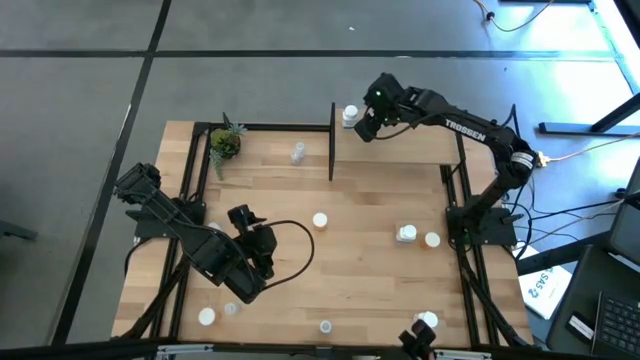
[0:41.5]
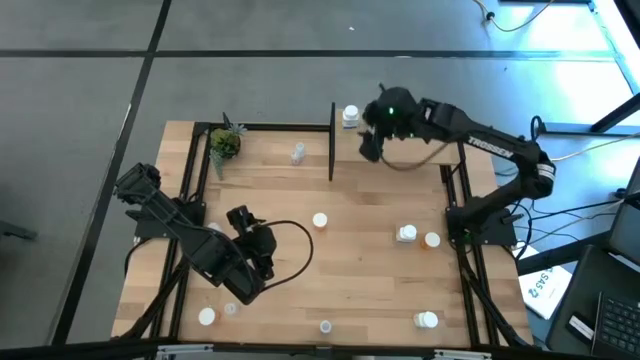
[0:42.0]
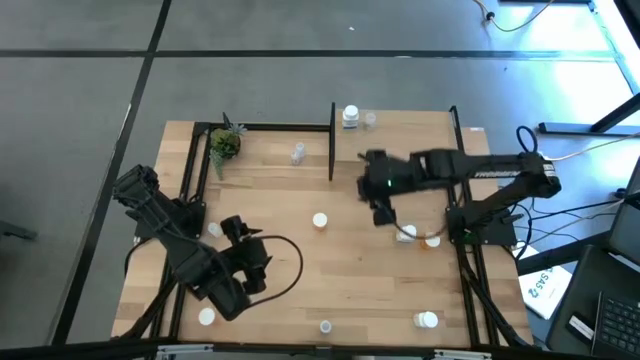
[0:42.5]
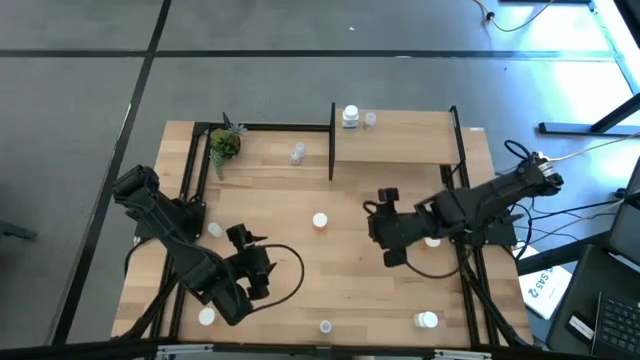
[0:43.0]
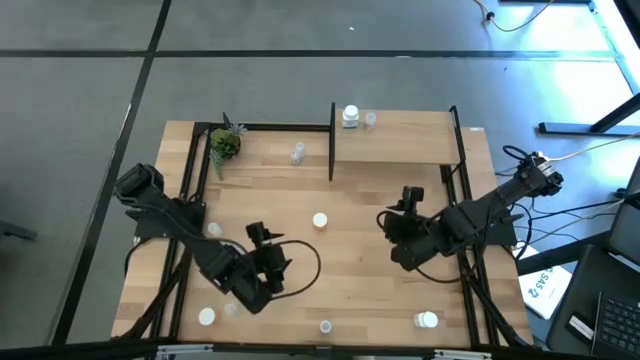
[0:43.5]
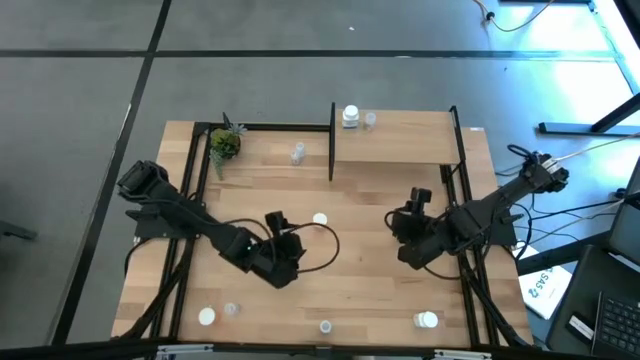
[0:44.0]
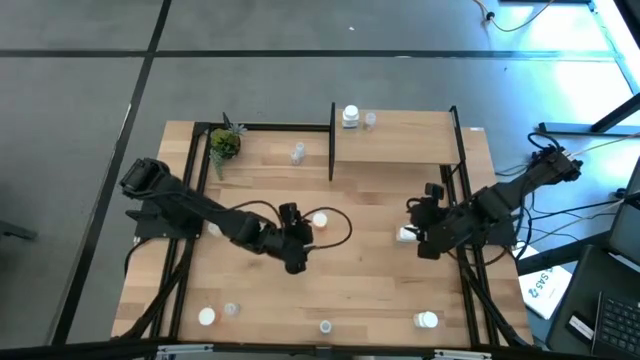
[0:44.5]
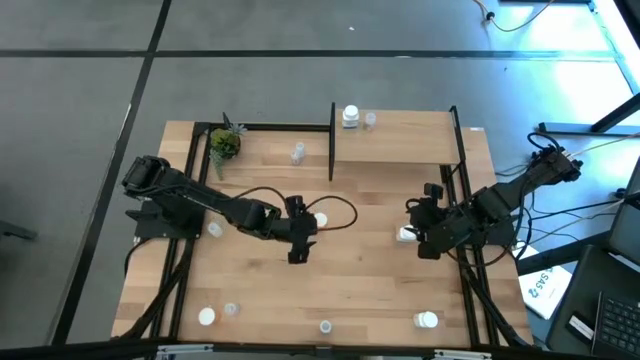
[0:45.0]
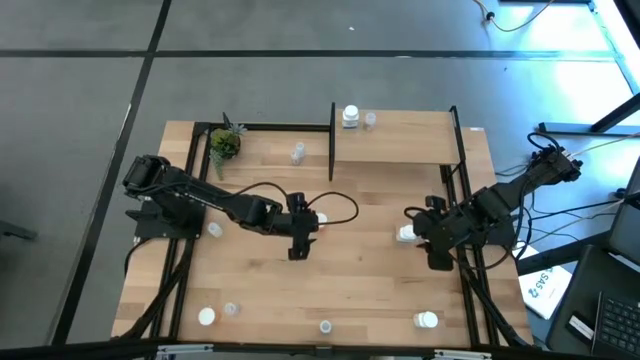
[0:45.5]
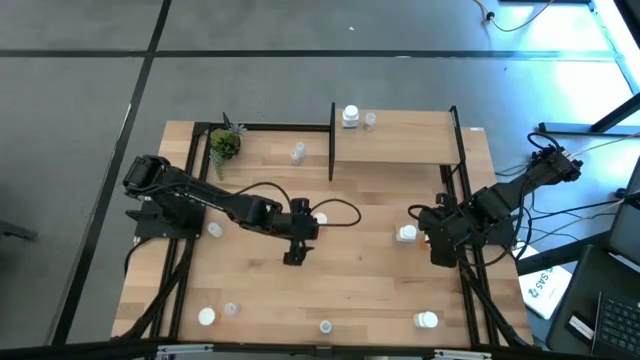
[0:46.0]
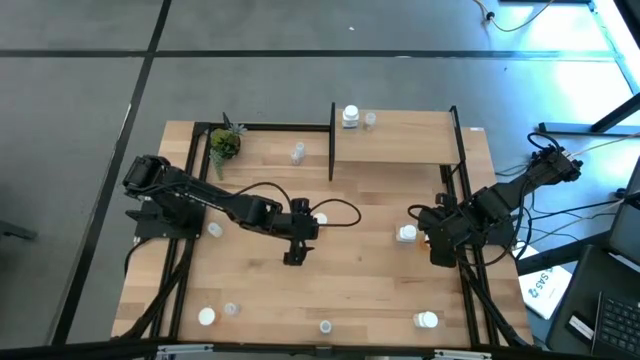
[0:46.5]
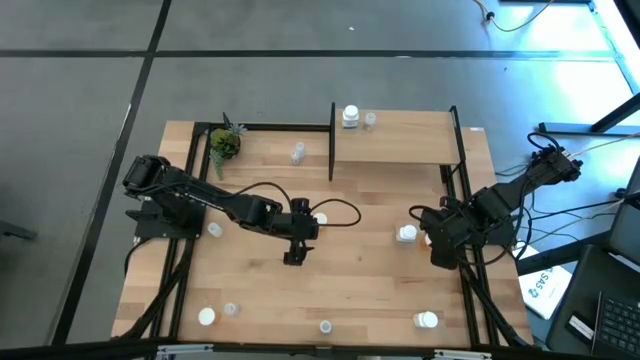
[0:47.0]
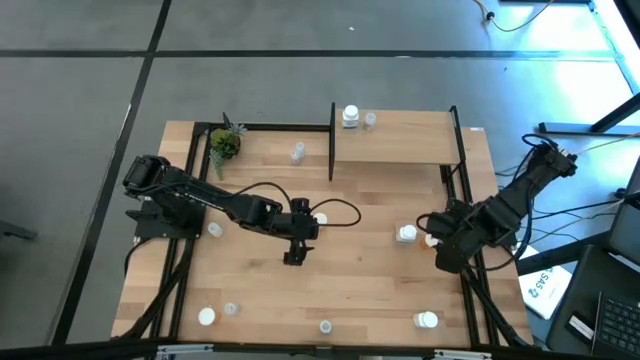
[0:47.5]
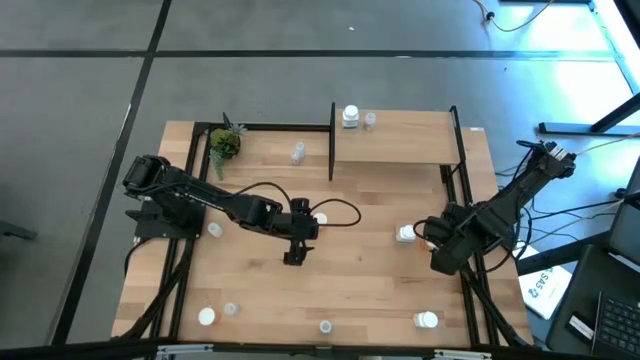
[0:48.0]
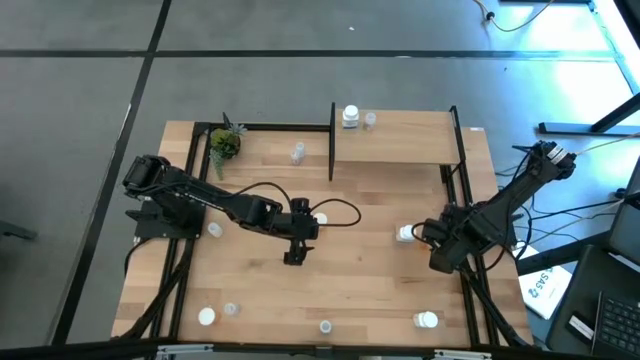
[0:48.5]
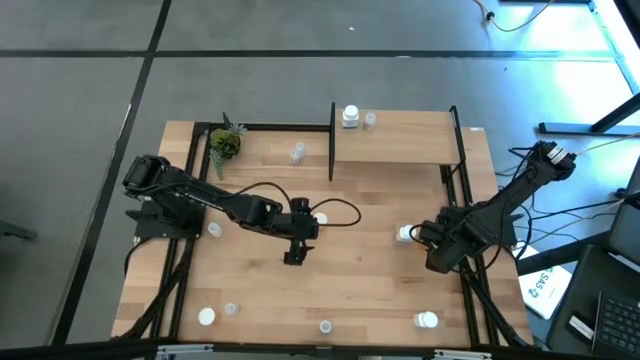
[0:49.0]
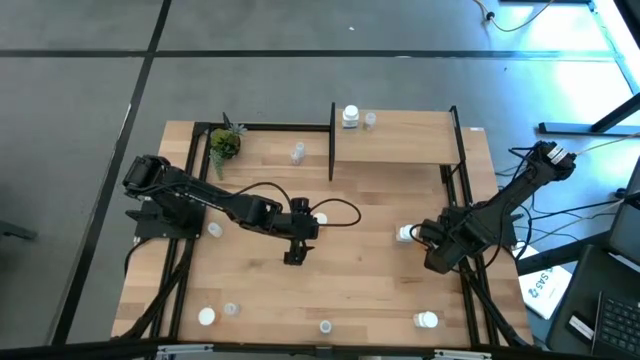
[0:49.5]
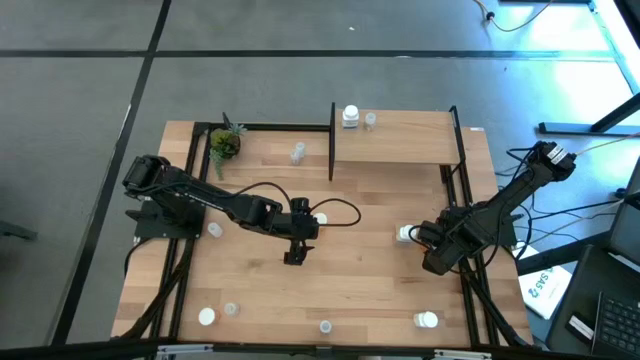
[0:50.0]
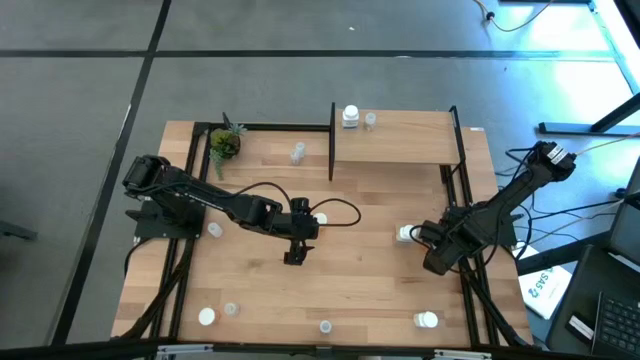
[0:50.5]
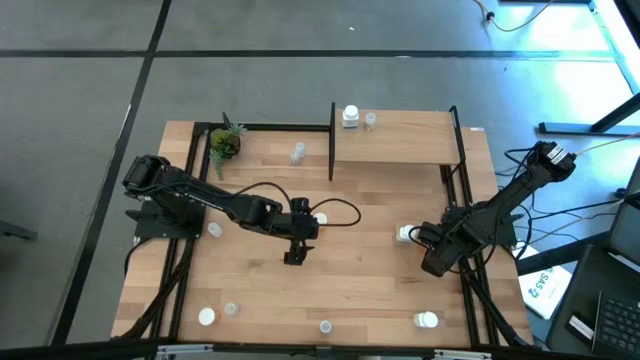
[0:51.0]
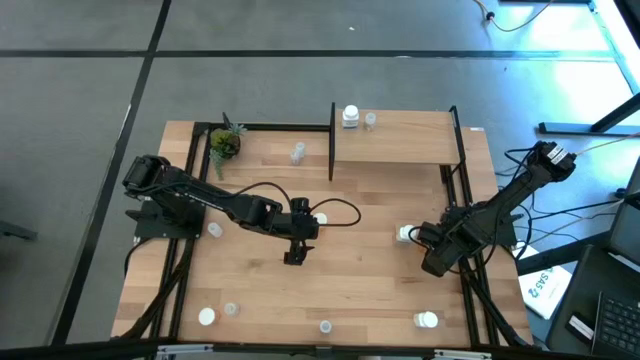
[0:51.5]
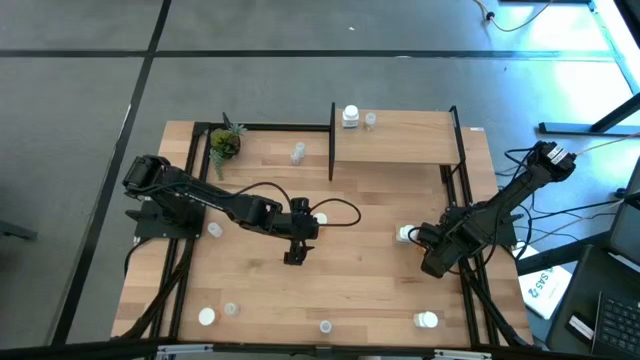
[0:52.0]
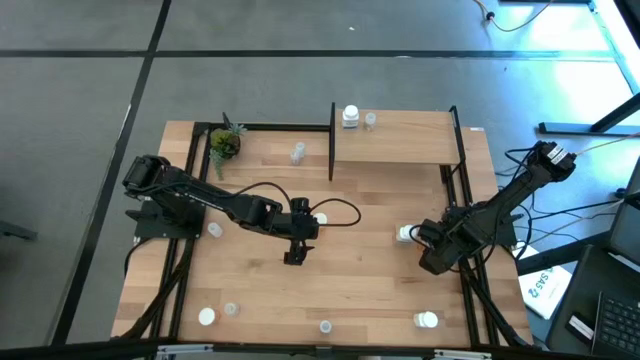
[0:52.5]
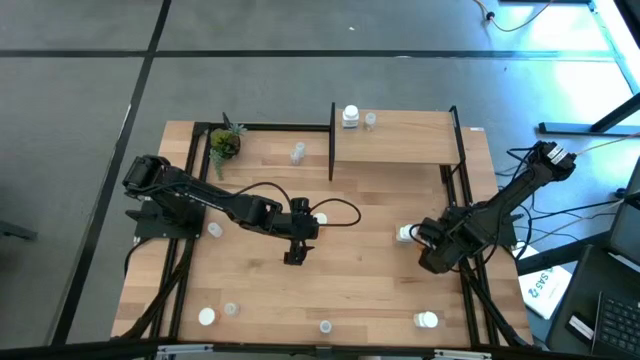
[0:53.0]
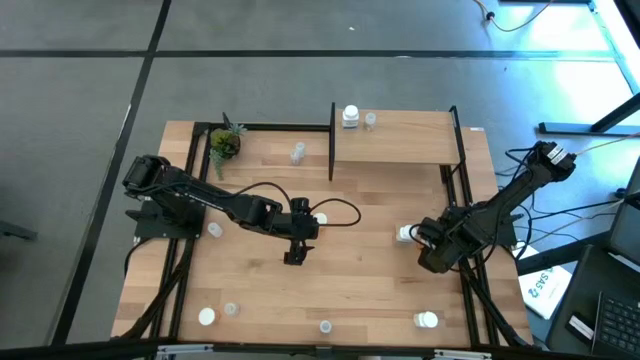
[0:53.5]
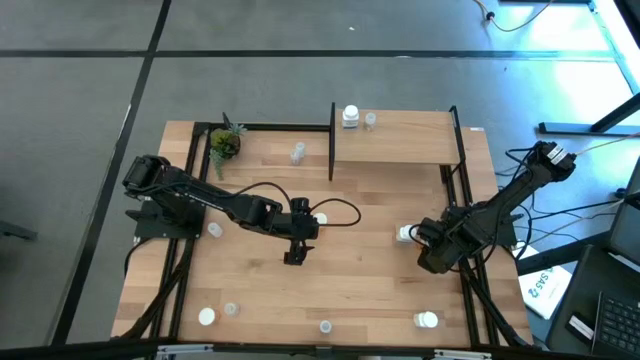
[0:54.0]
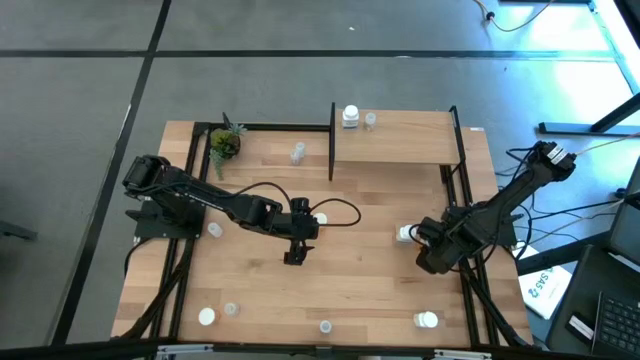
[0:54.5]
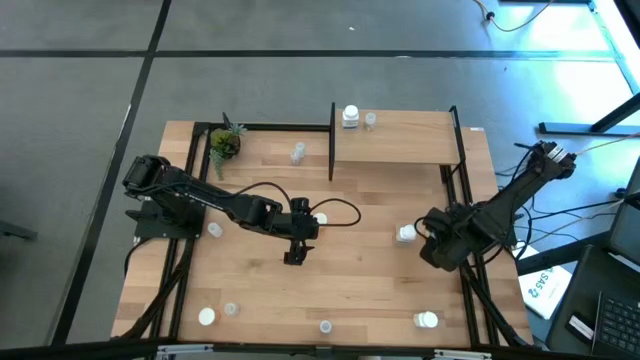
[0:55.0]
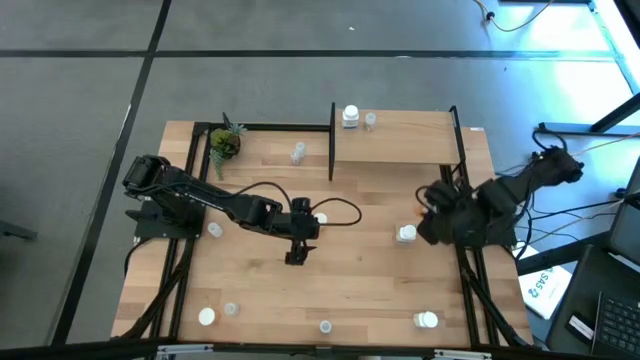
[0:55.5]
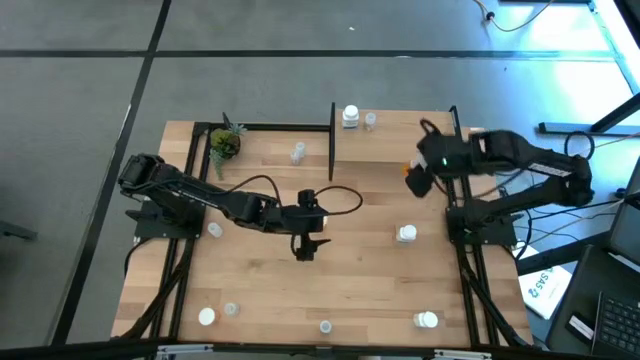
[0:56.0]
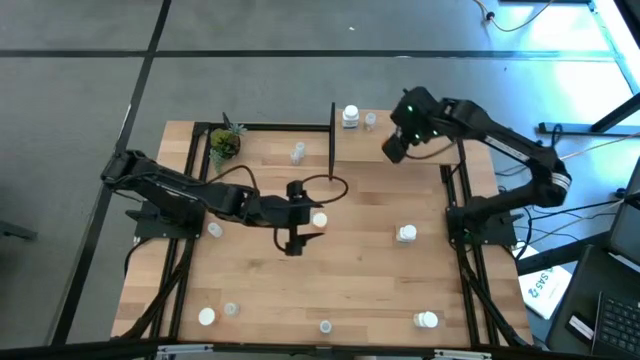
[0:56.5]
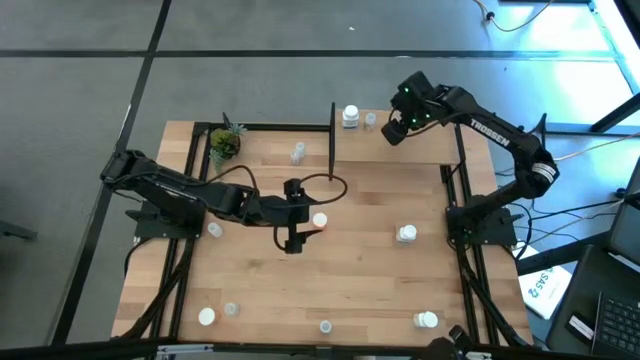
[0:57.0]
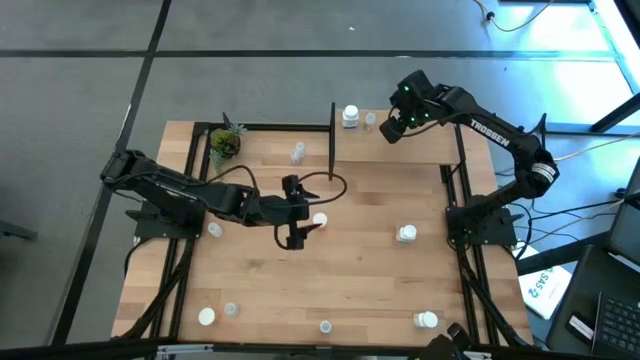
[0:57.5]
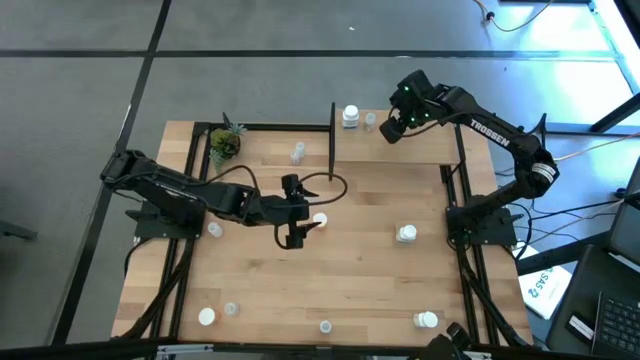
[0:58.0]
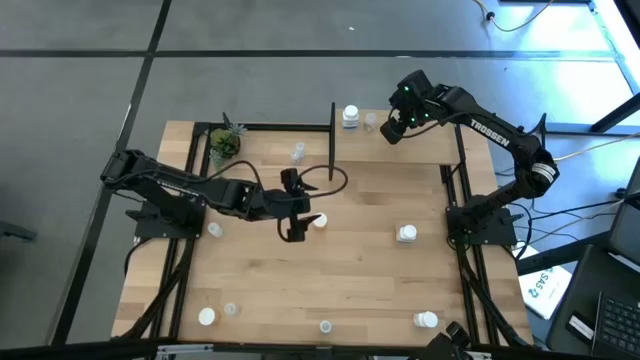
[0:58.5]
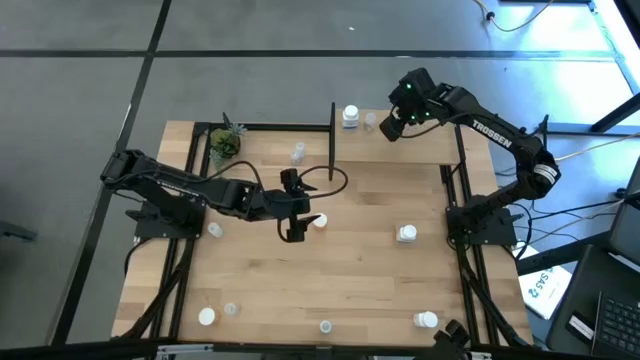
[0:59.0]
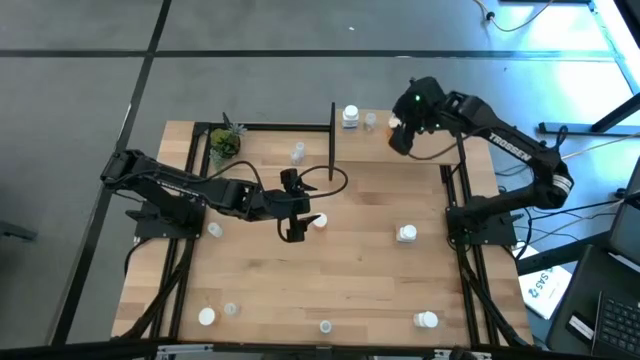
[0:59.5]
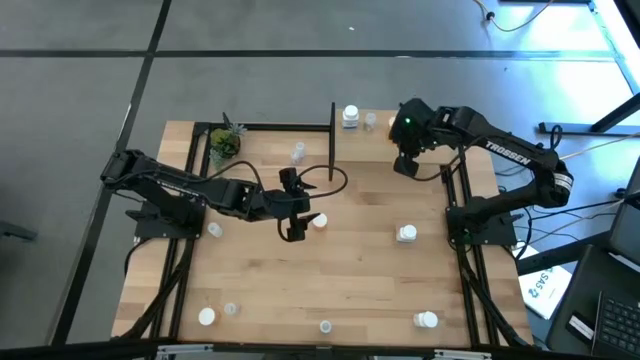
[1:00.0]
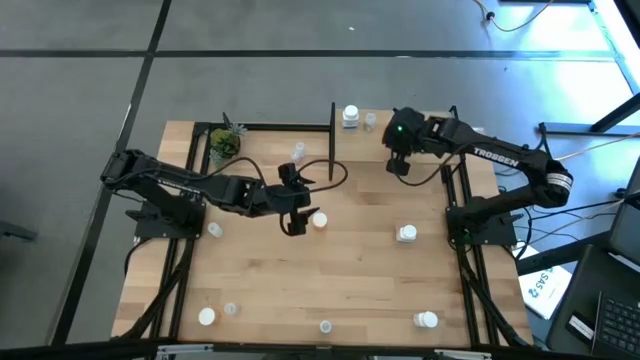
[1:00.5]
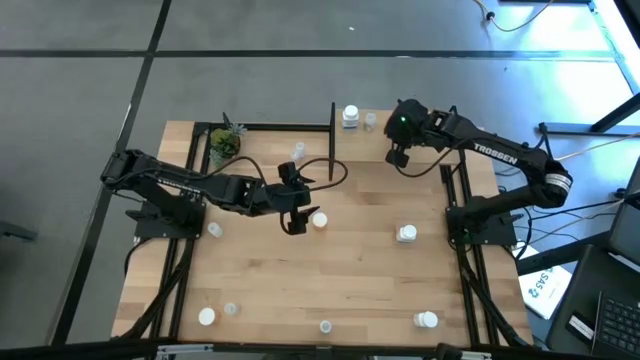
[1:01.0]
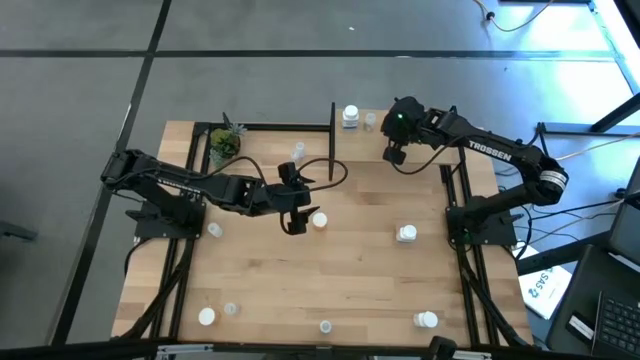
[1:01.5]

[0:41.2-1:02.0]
Task: Pick and place medicine bottles onto shelf by color
Put the right orange pill bottle on the shelf

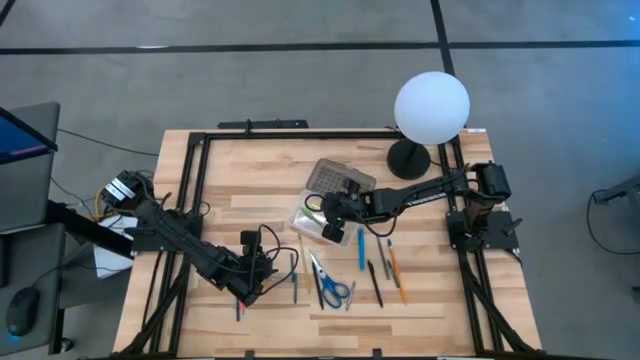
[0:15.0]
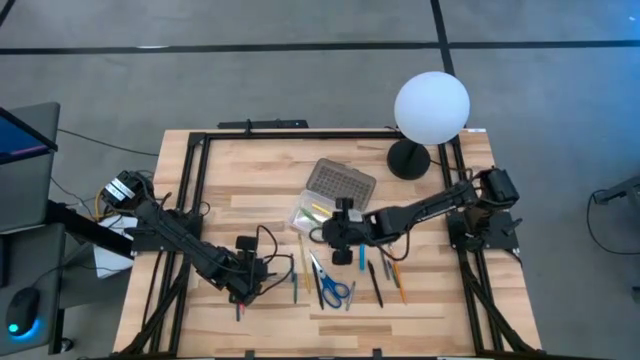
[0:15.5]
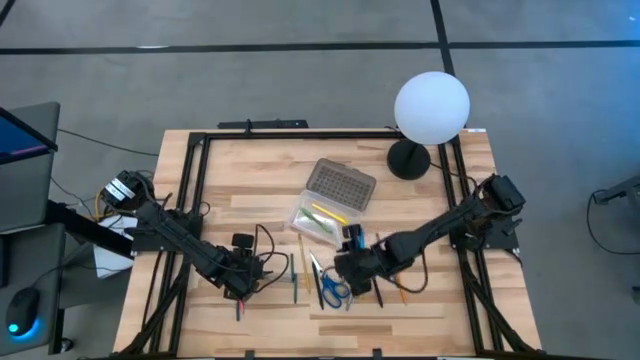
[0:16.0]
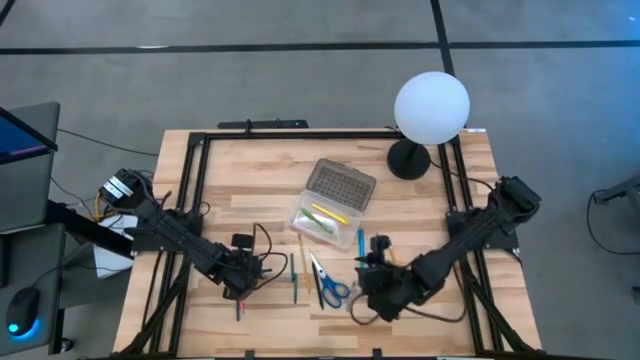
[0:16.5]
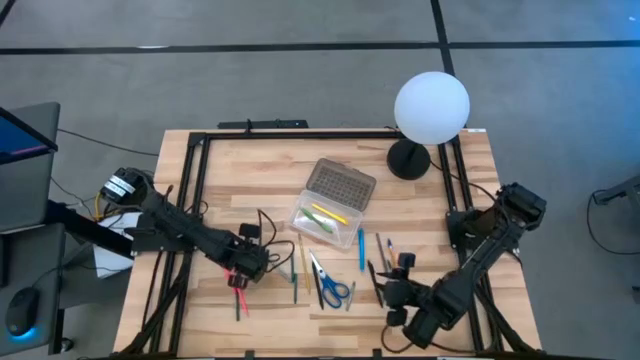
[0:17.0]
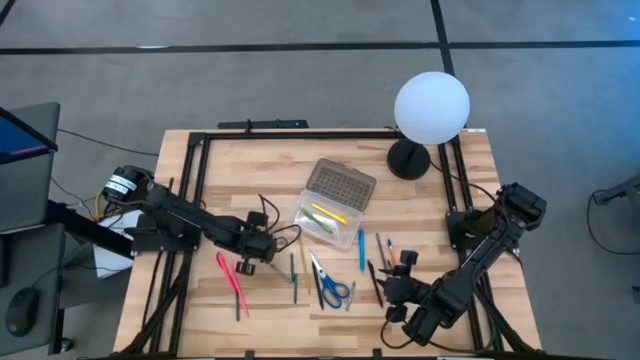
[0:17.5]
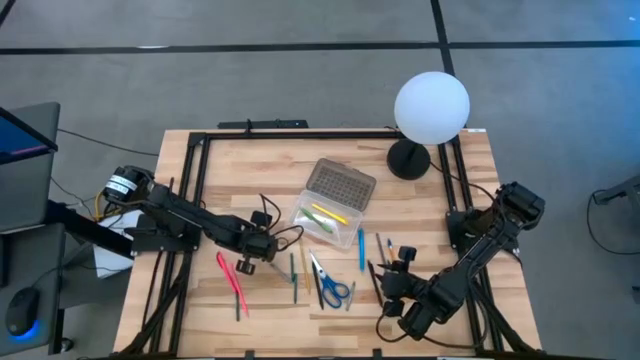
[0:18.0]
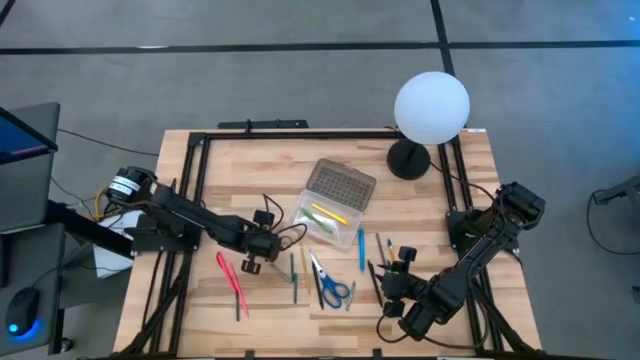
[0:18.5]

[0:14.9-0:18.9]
Task: Pick & place school supplies into a supply box
Put the black pen into the gray supply box
